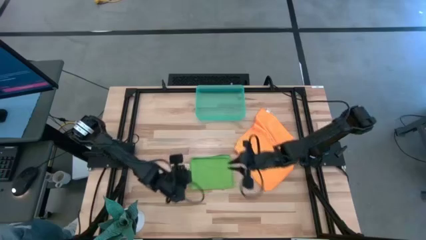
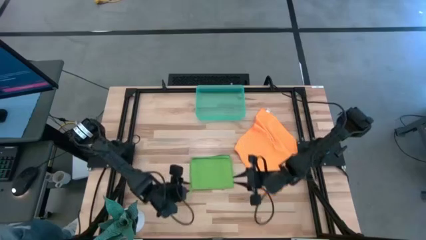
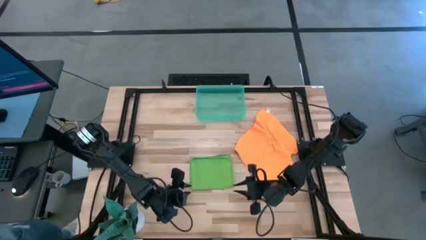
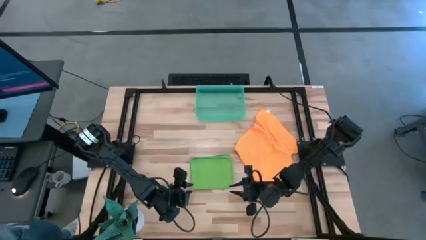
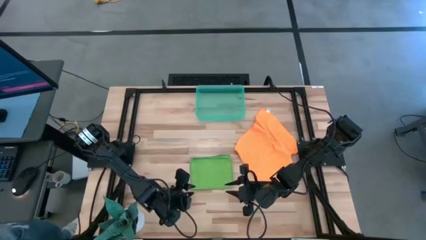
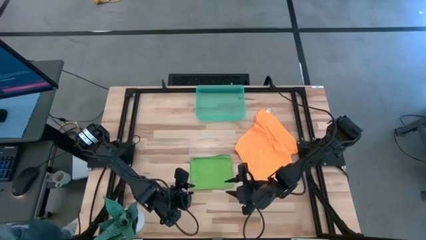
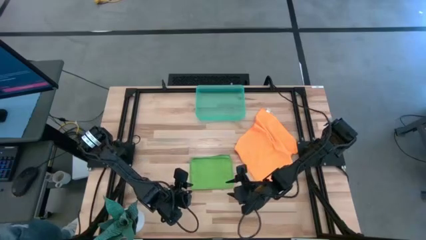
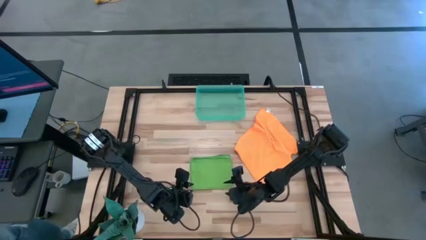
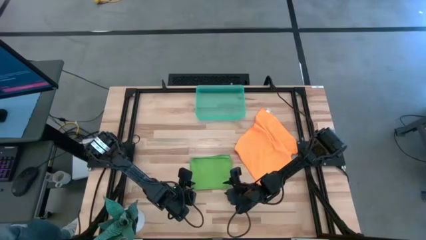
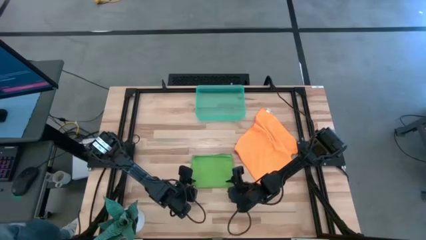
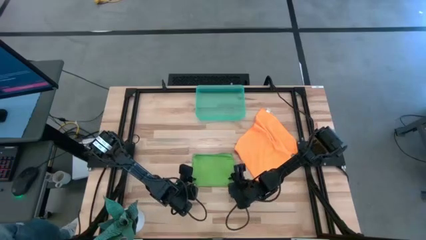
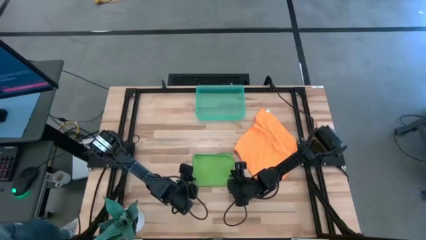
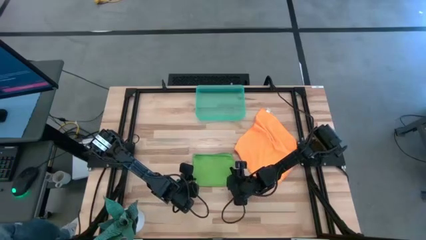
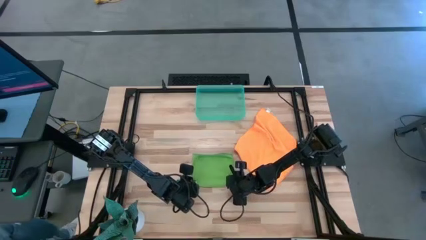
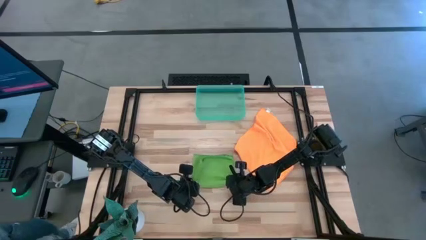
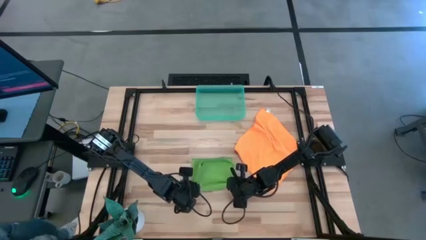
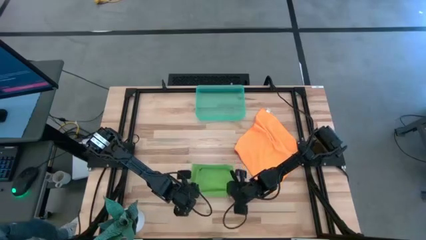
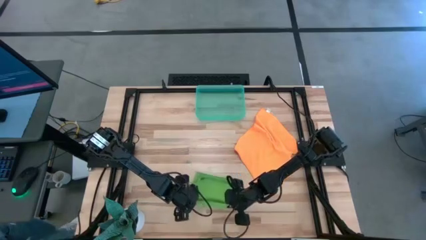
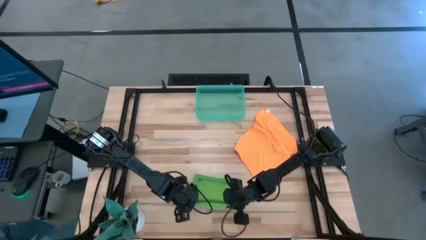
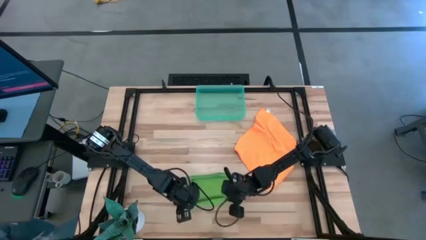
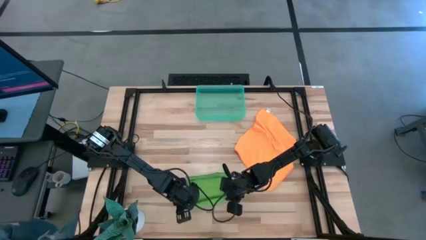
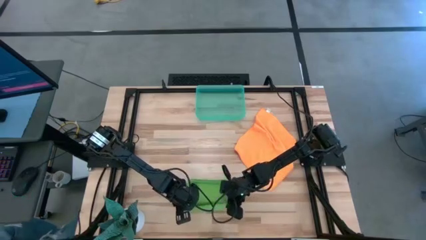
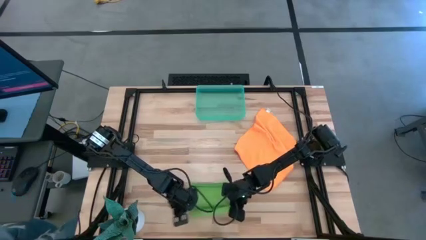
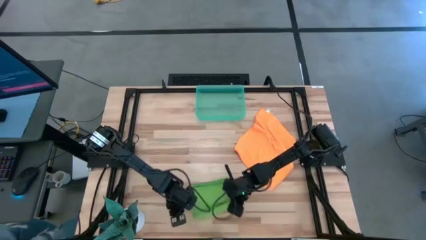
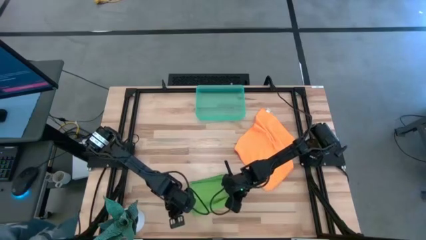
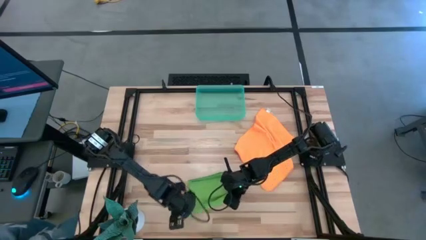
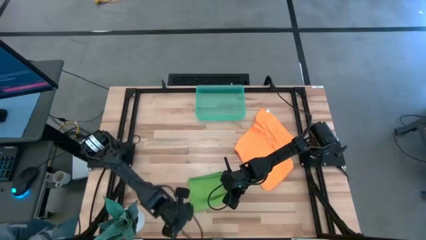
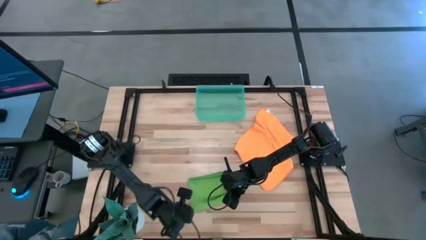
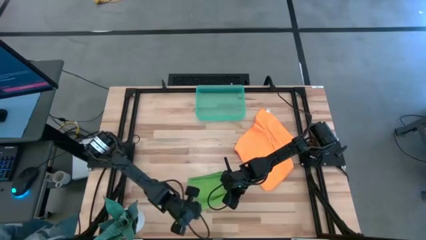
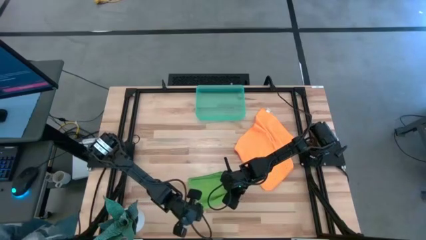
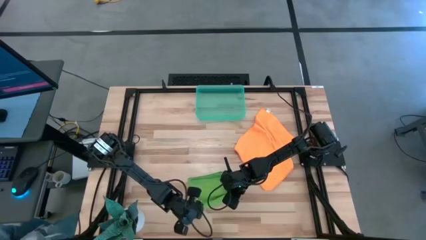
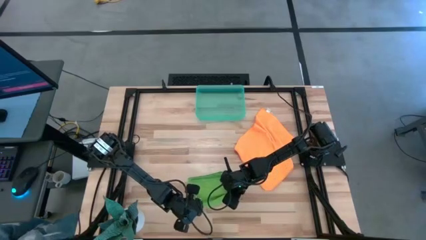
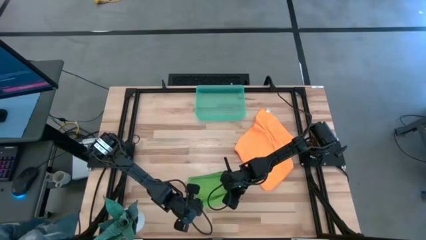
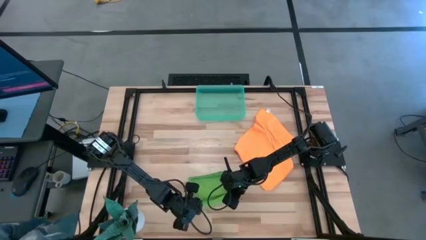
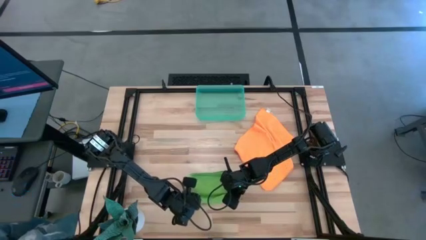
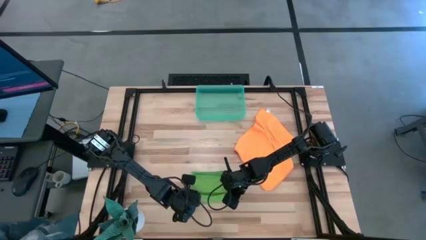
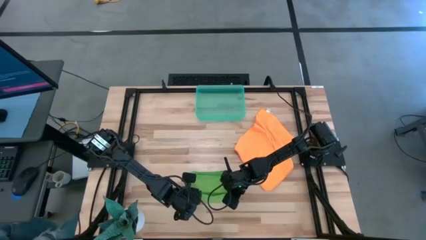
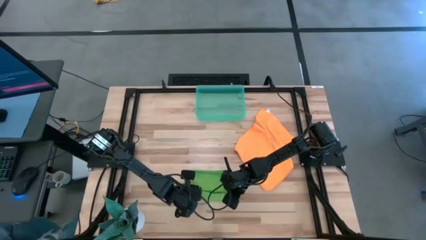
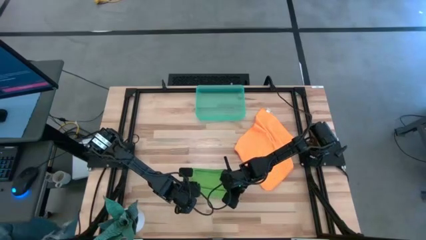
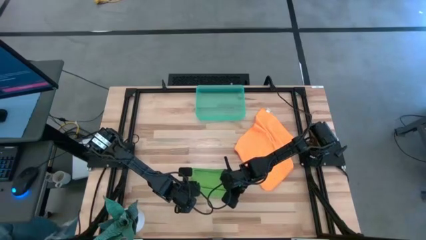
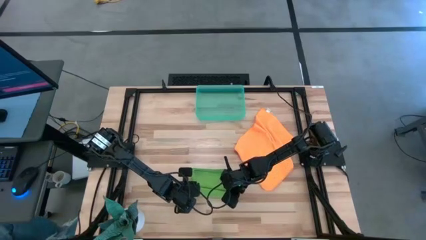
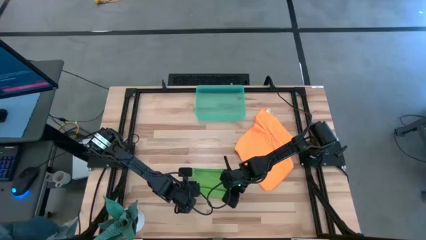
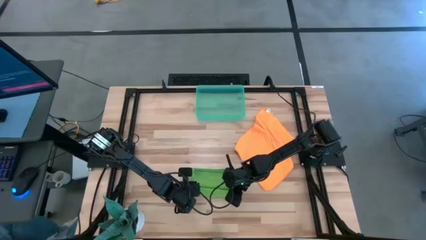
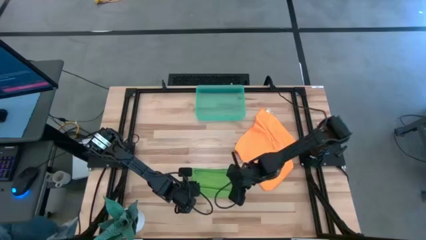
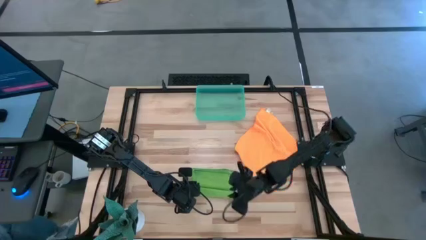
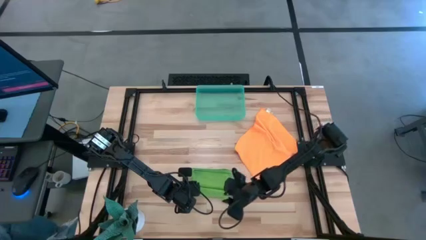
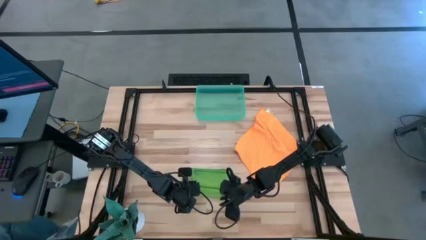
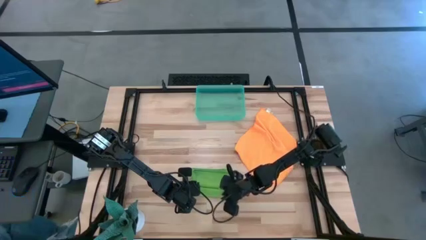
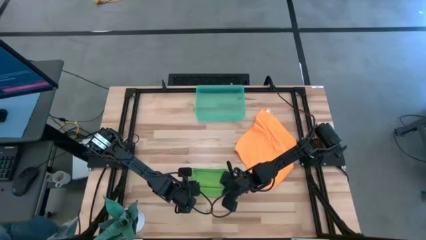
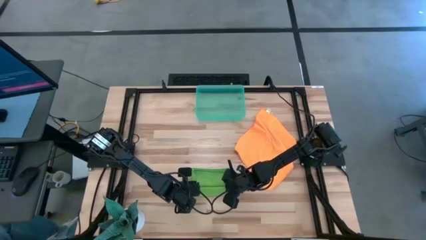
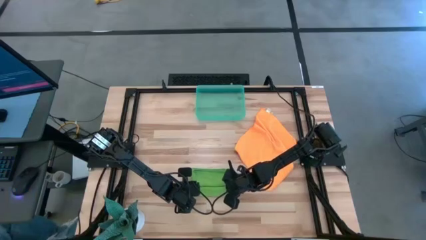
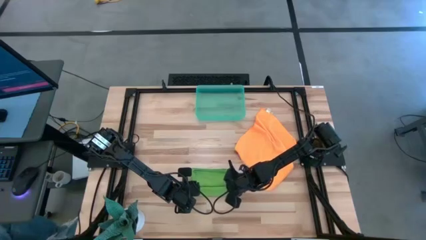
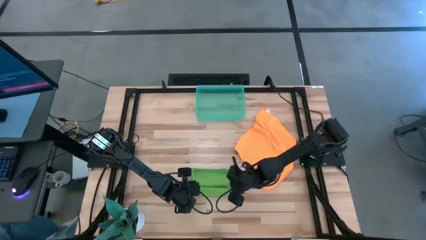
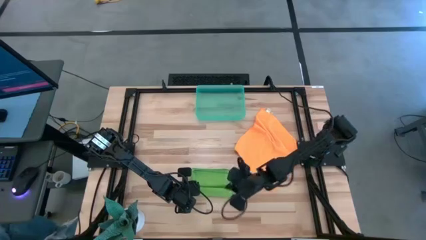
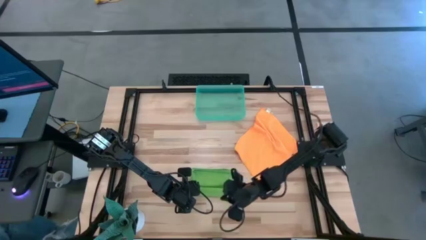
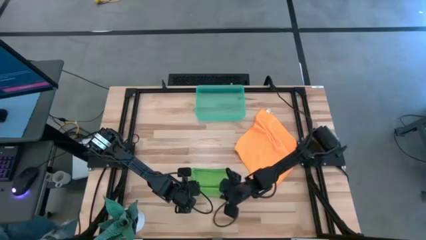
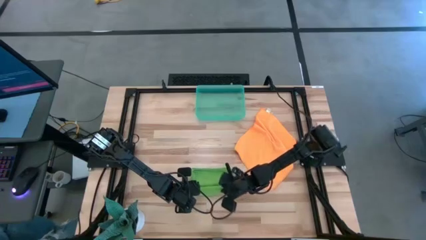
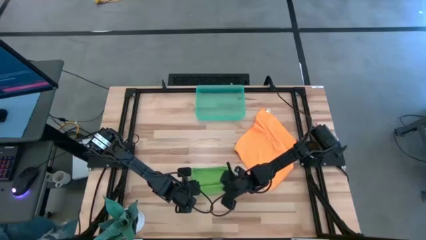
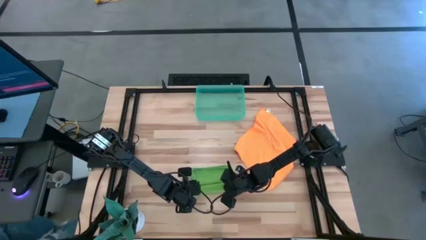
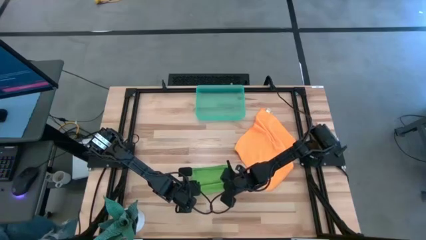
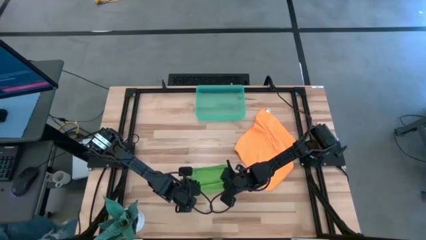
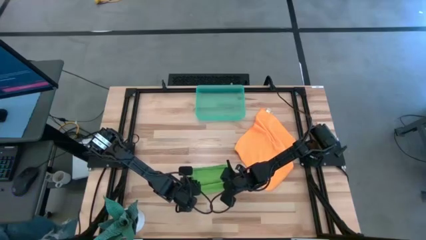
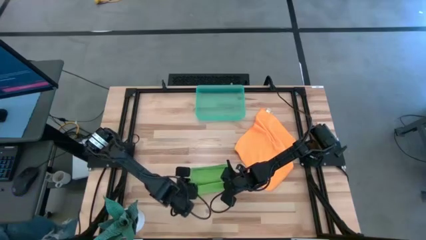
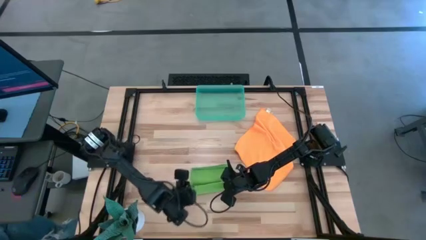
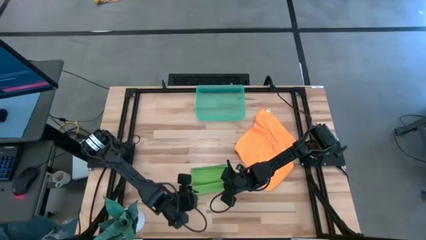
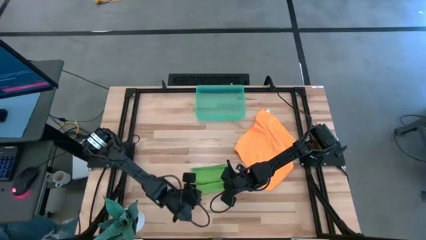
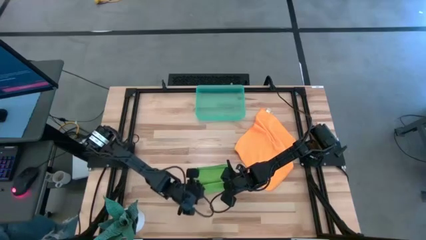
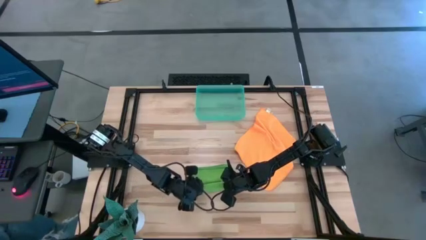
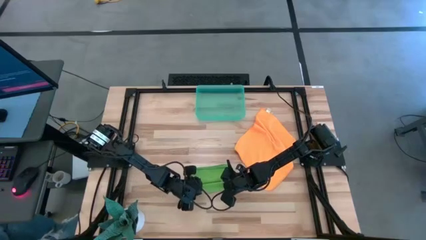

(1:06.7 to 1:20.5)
Task: Roll microfiber towels into tight, uniform cylinder then place into a basket
Roll the green microfiber towel

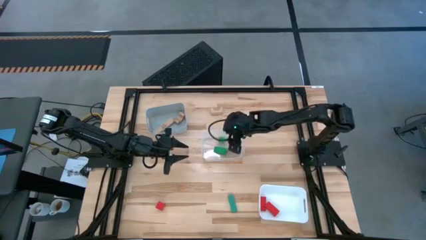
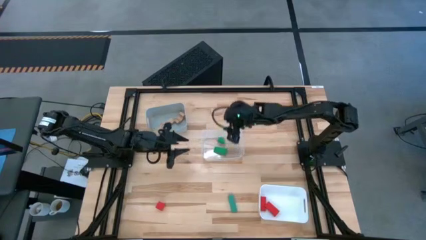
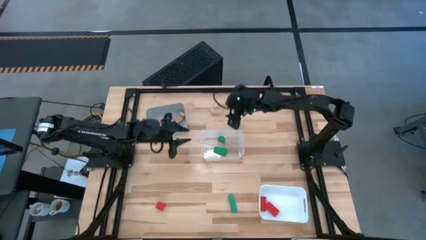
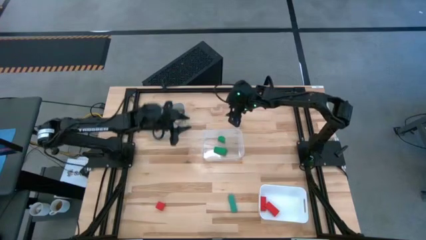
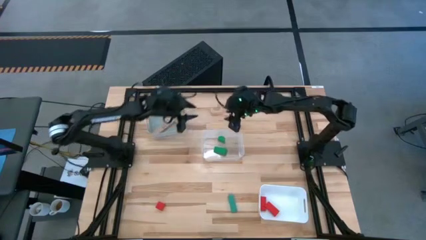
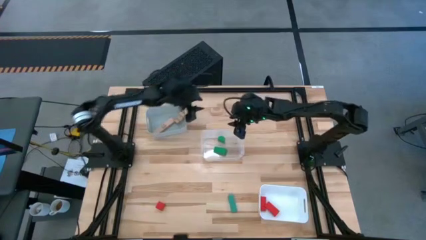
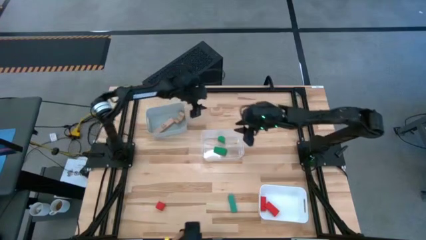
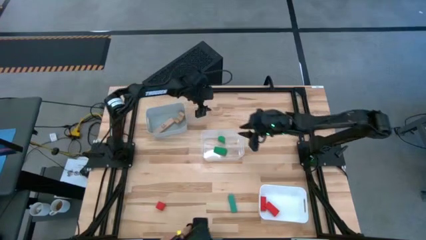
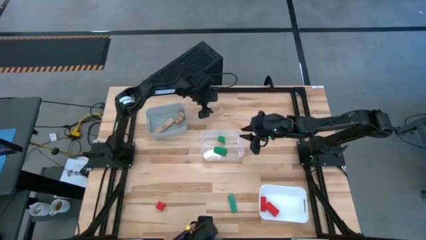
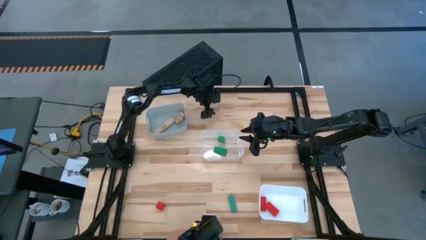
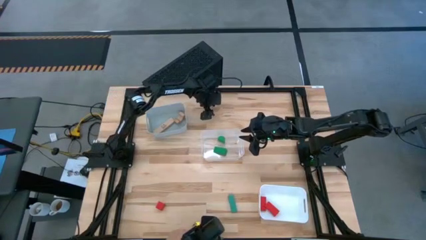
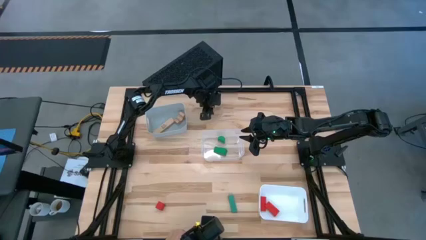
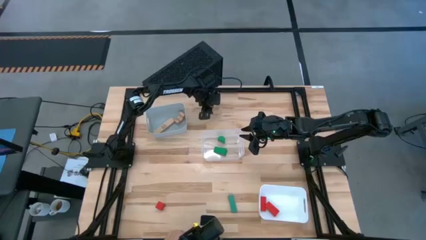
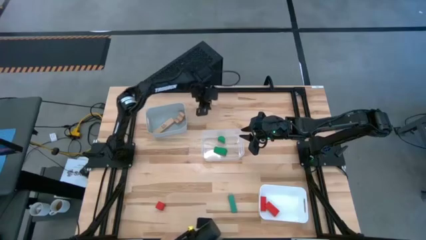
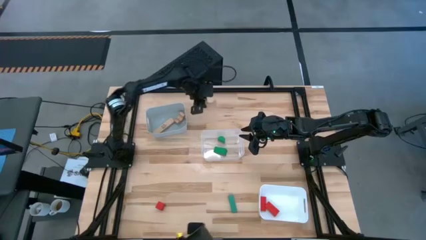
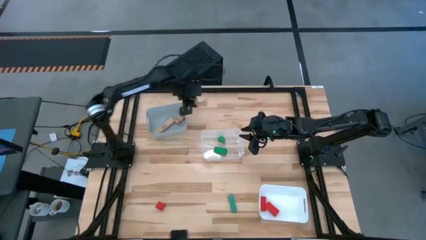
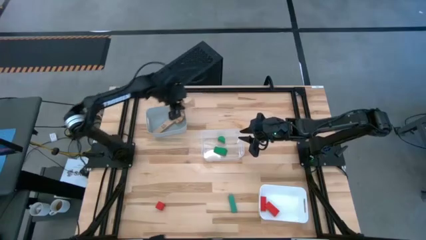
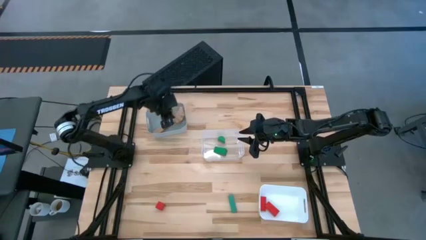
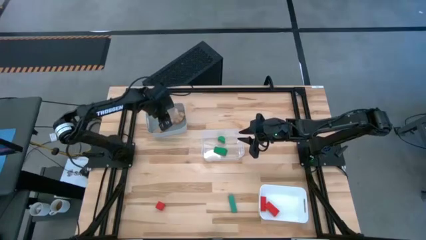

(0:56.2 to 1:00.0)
Task: Sort & place blocks by color
Put the brown block into the gray bin
